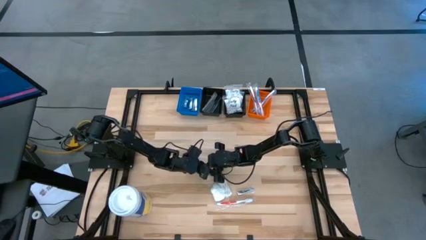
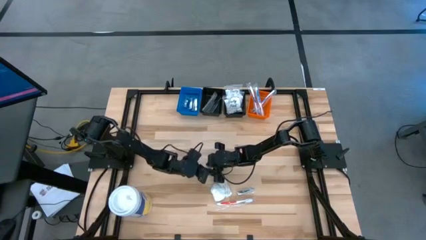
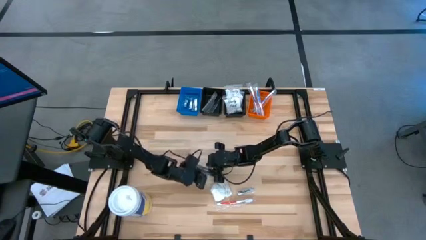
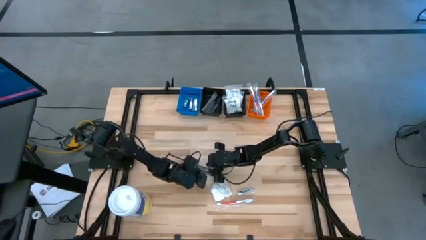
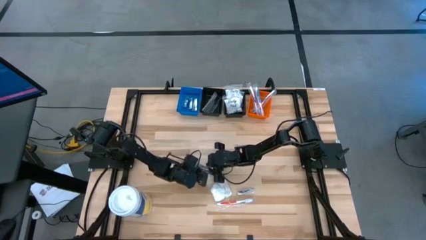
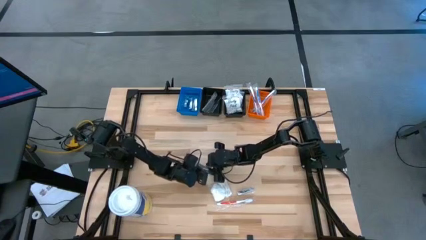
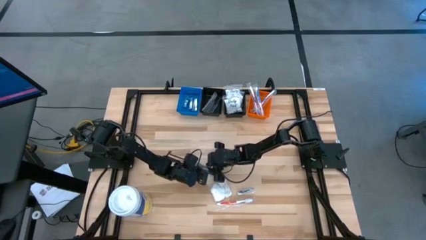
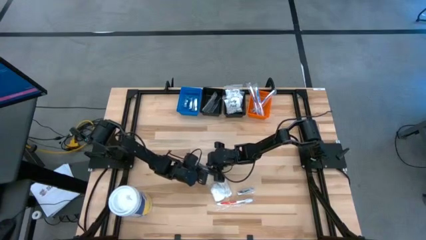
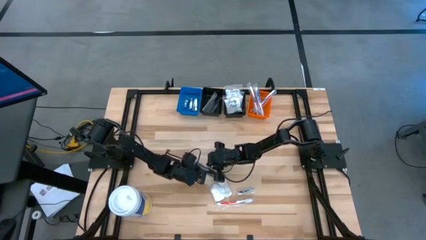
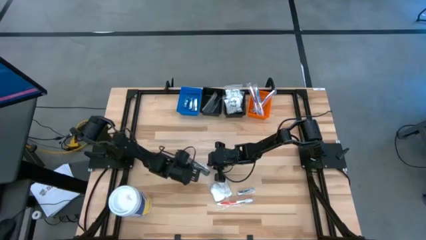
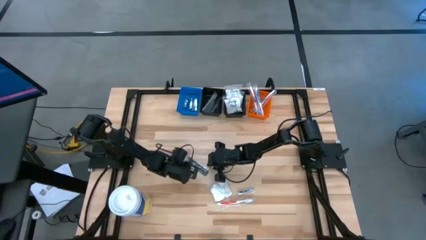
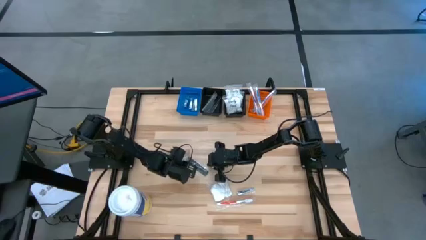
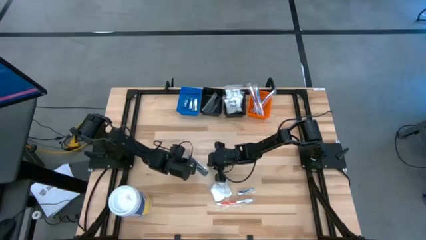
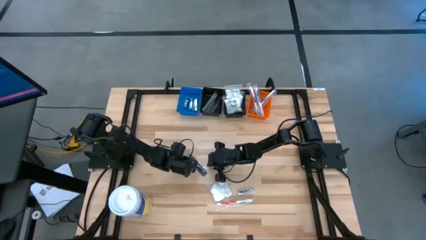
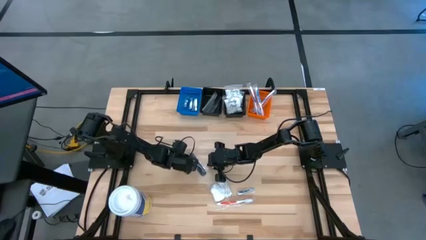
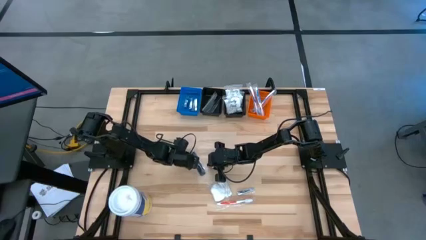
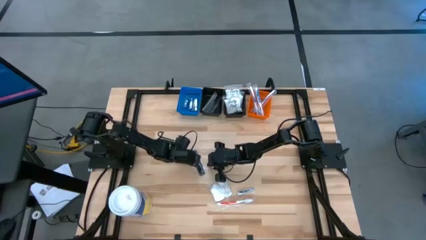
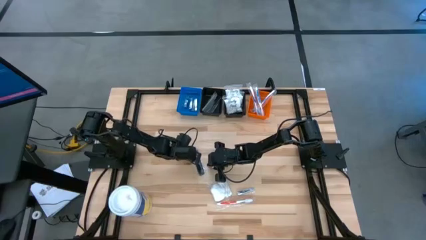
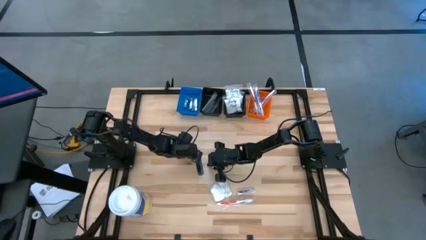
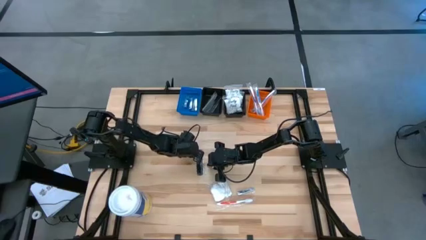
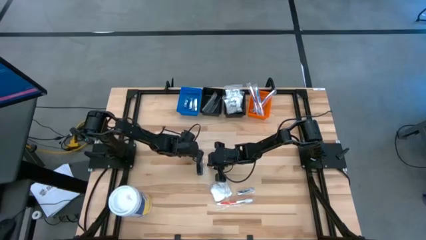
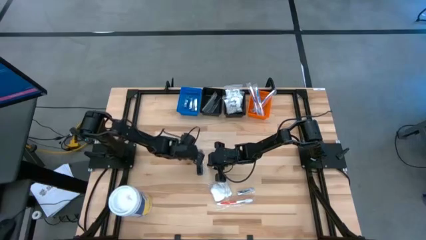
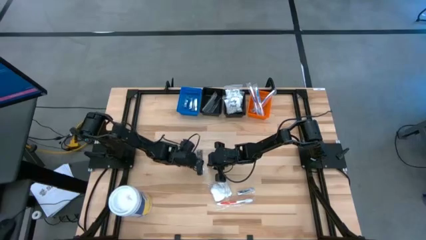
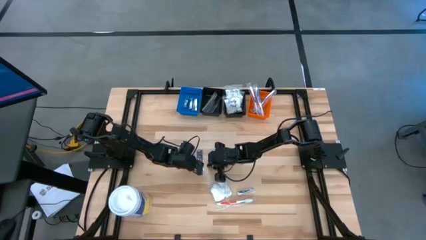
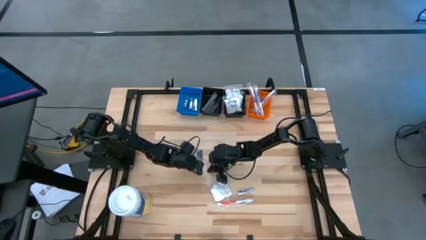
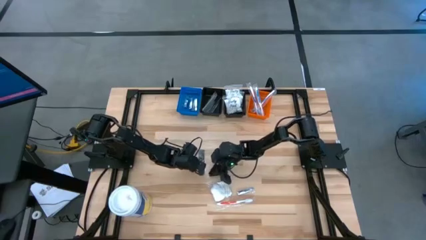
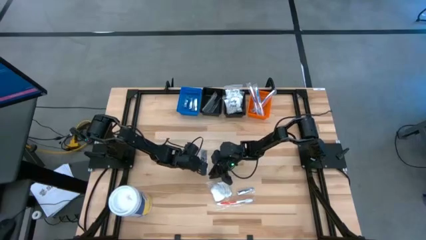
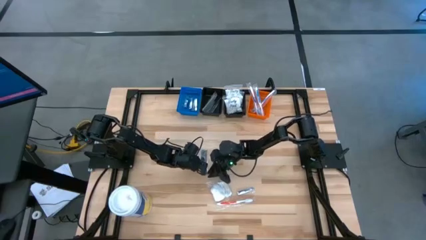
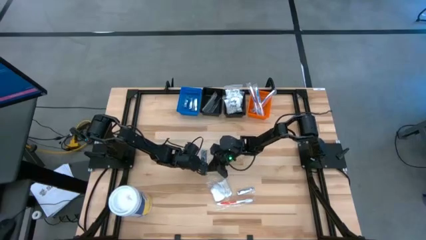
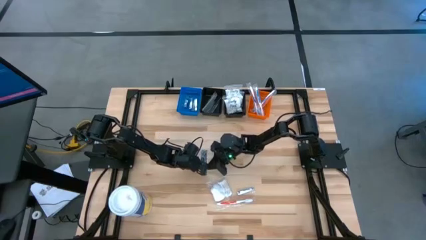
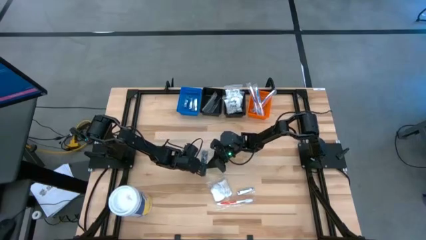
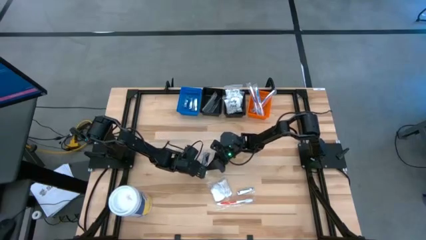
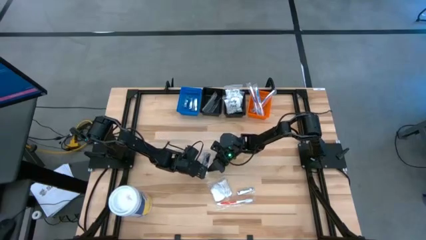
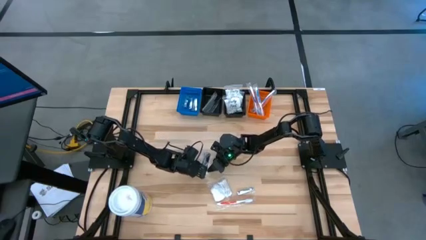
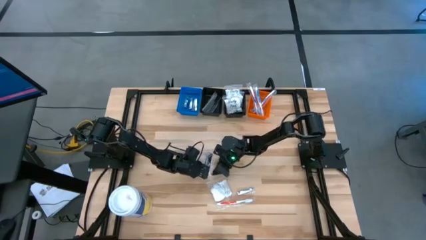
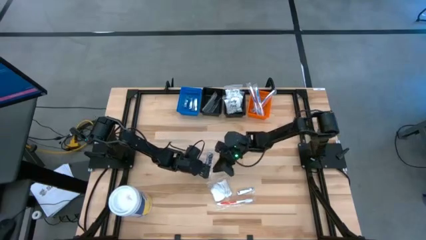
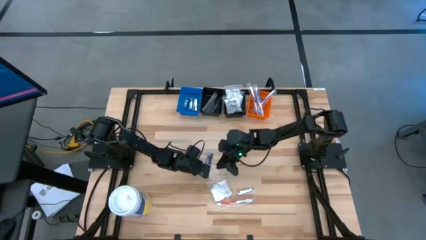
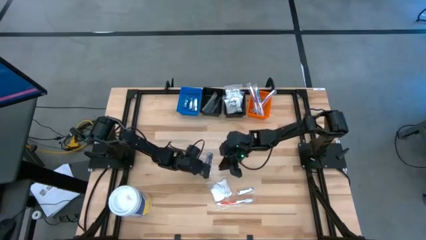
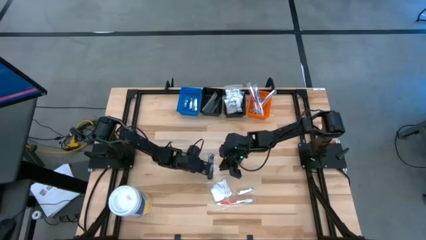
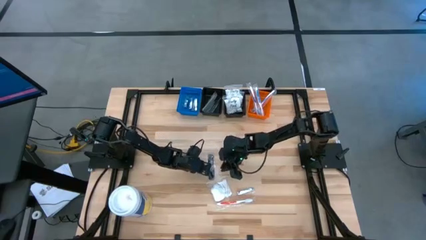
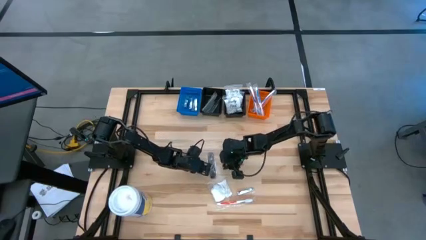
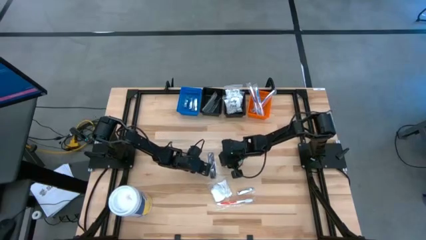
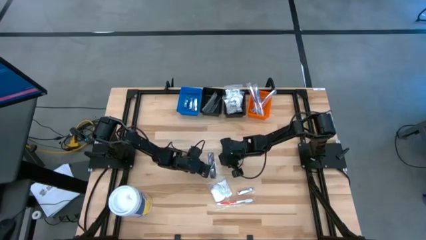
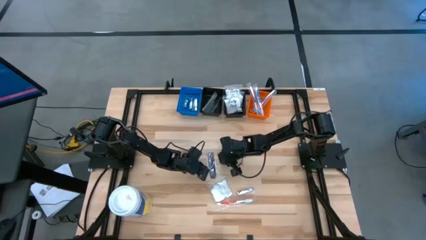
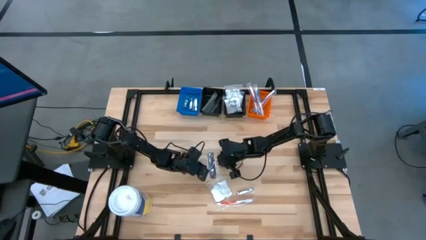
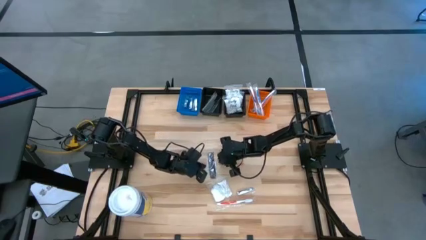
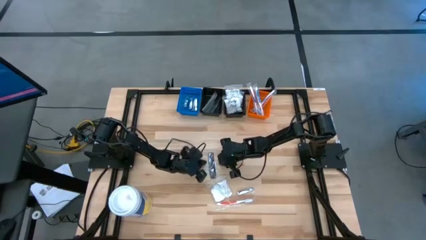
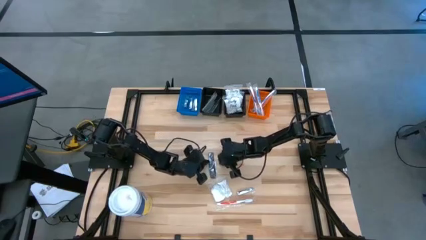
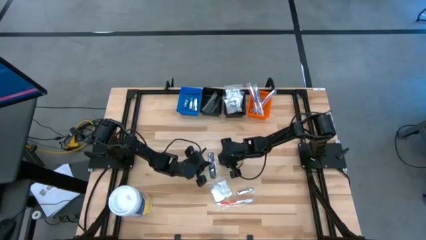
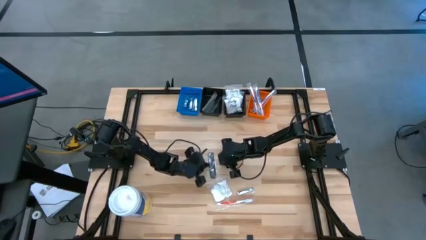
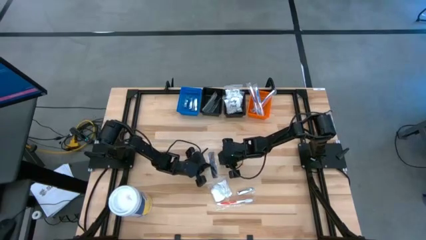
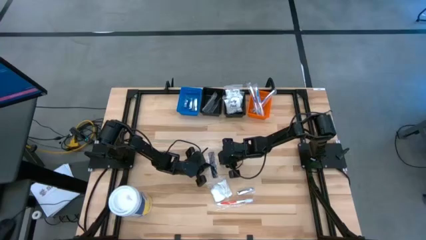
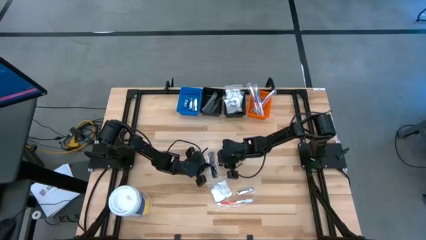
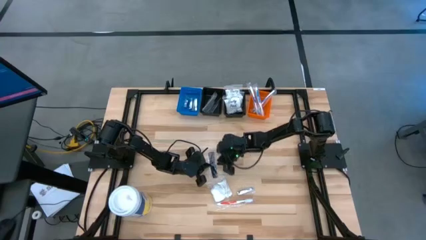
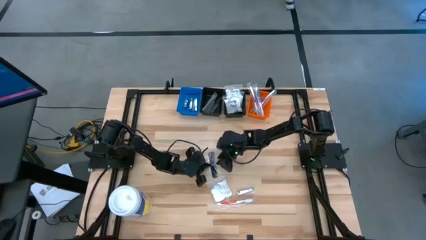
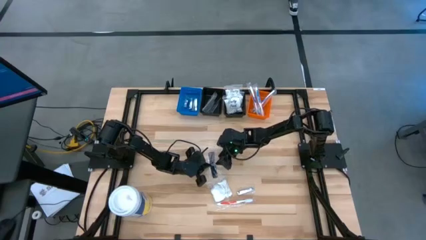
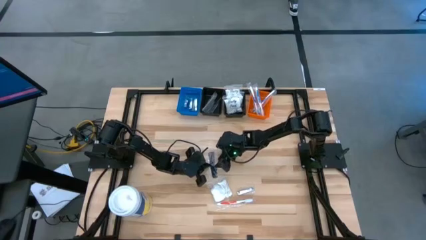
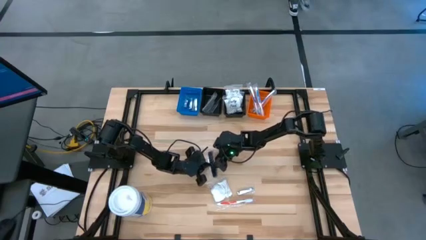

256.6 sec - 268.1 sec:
Task: Pick & Place Travel size toiletries
Put the black comb into the left black bin

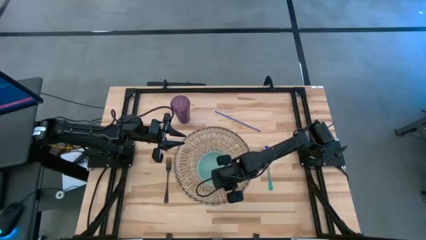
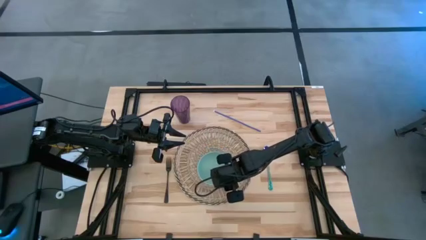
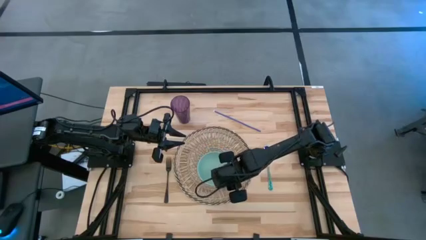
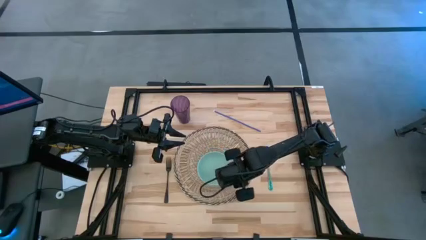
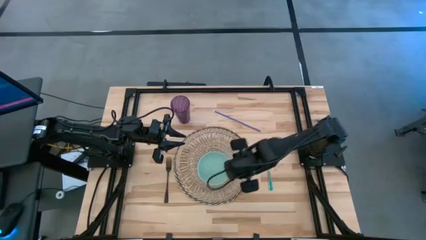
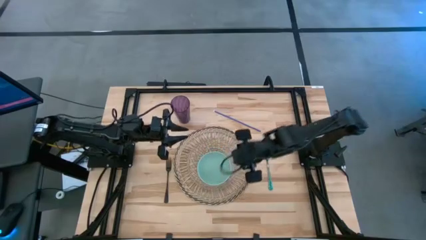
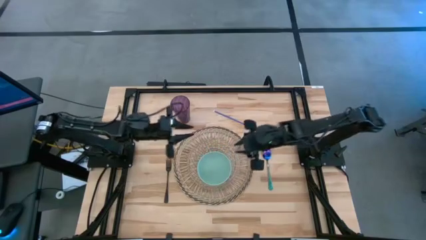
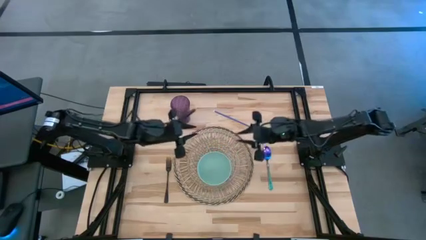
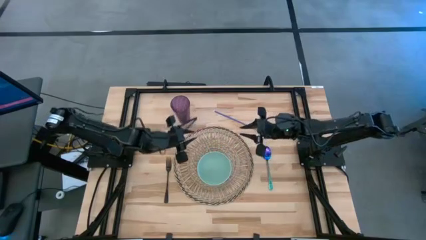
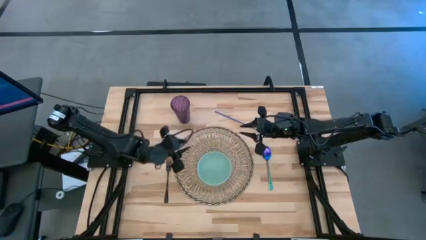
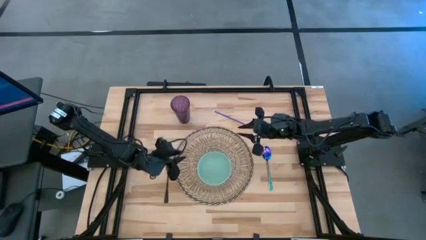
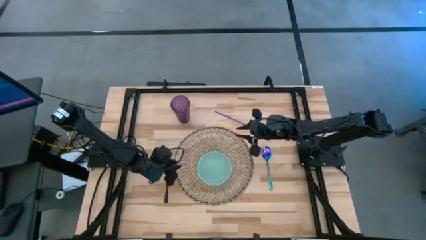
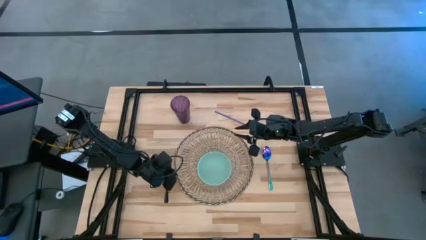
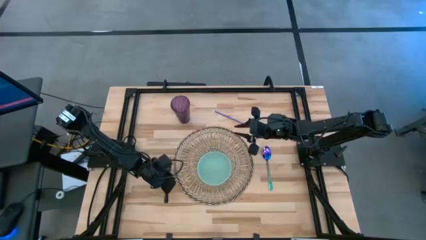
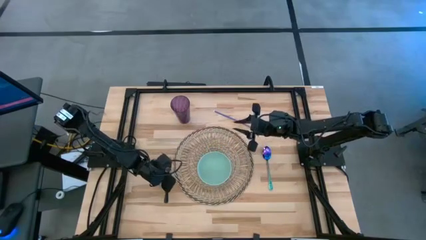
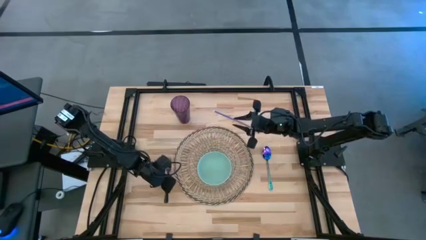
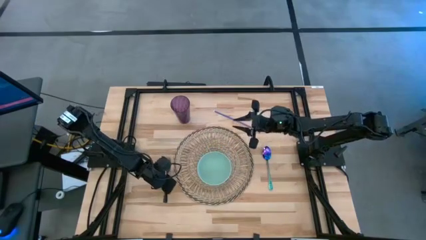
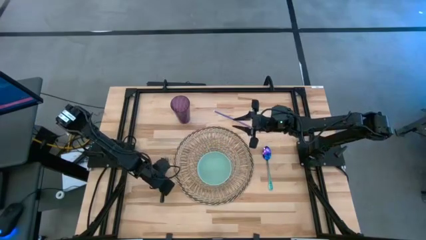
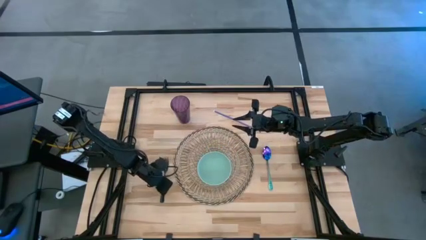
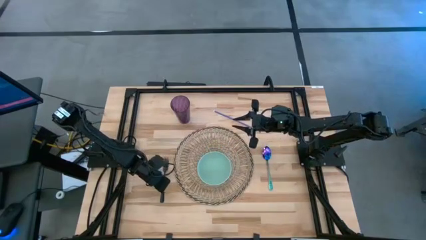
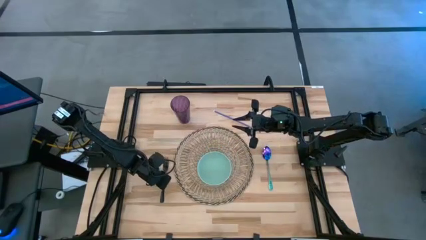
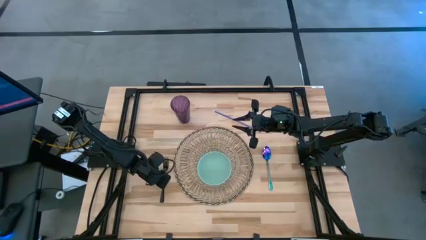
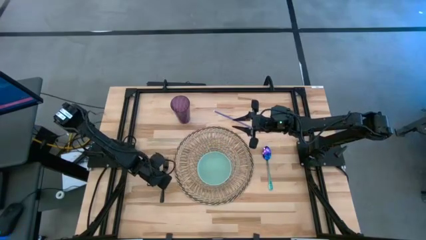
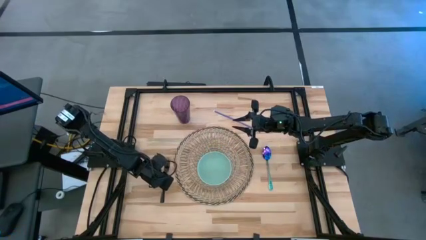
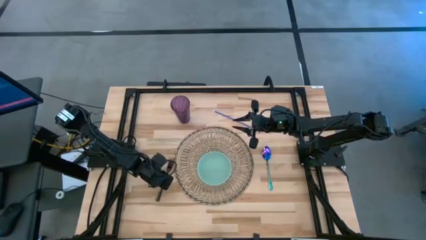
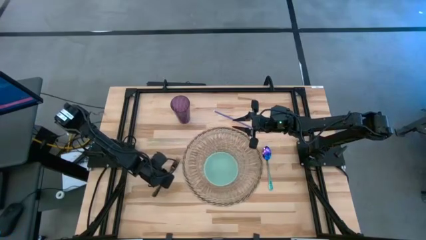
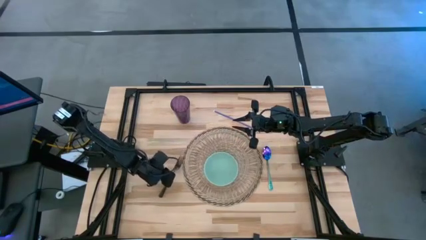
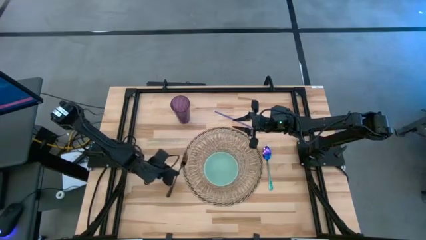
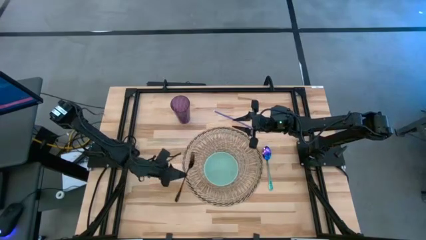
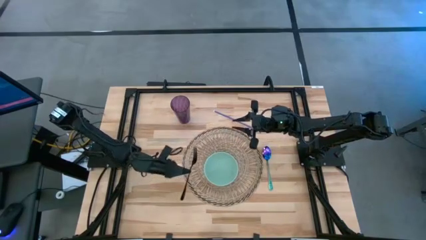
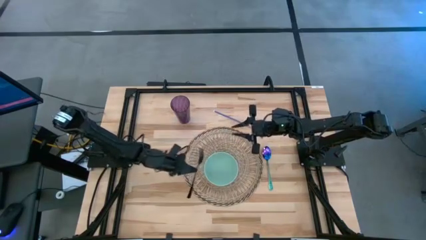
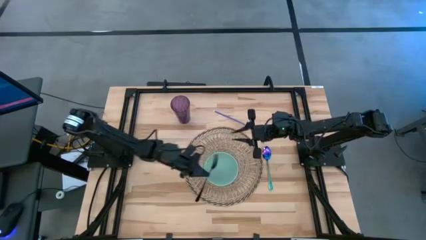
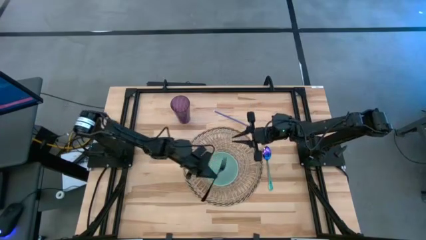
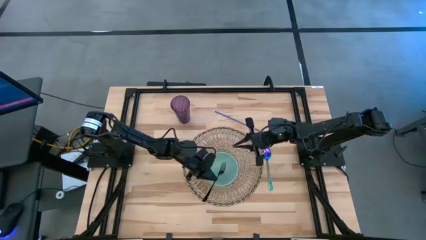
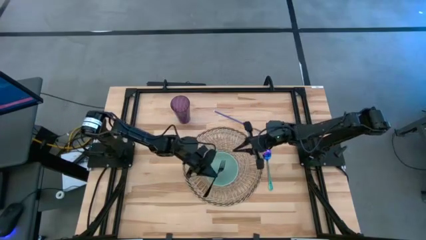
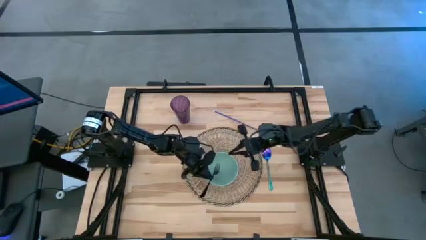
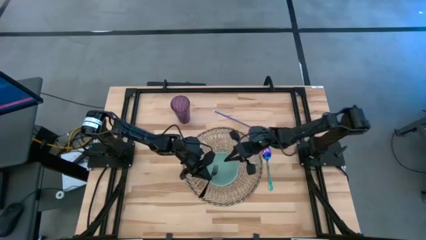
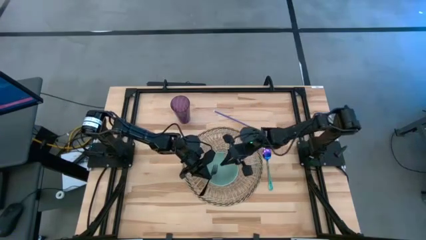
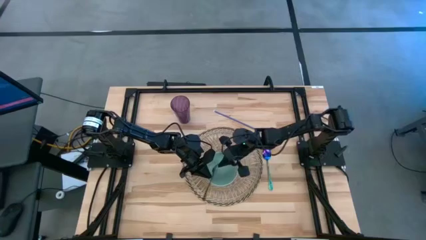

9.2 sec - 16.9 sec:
Task: Pick & Place Utensil
Put the black fork into the blue bowl on the brown mat
